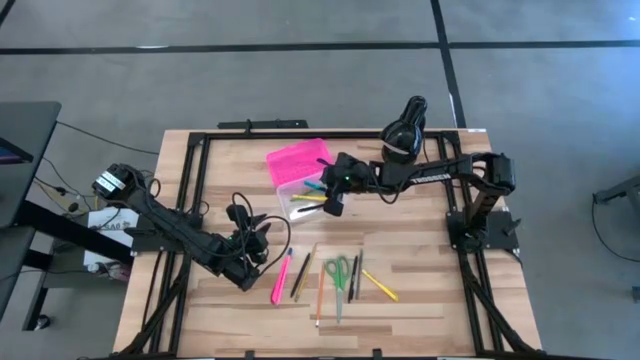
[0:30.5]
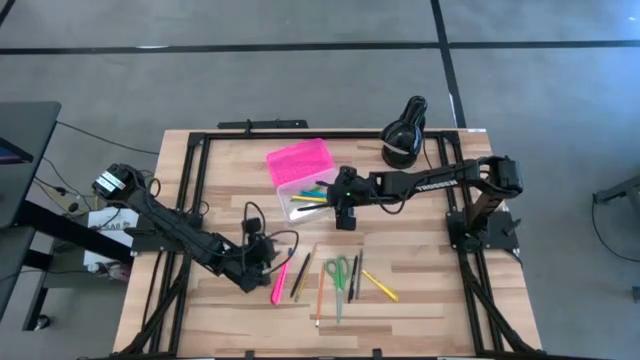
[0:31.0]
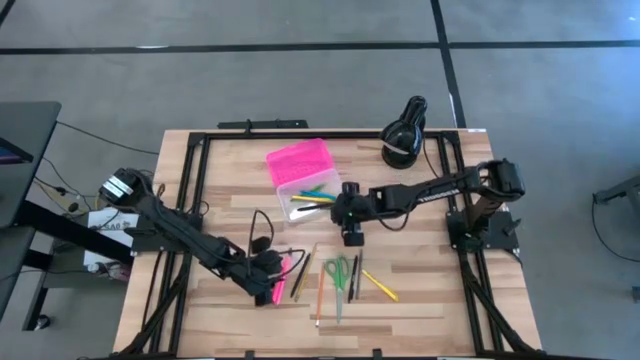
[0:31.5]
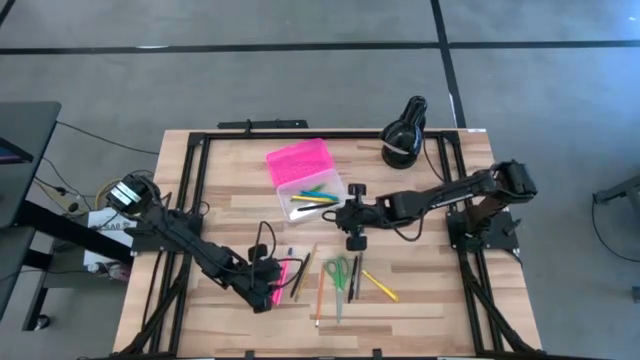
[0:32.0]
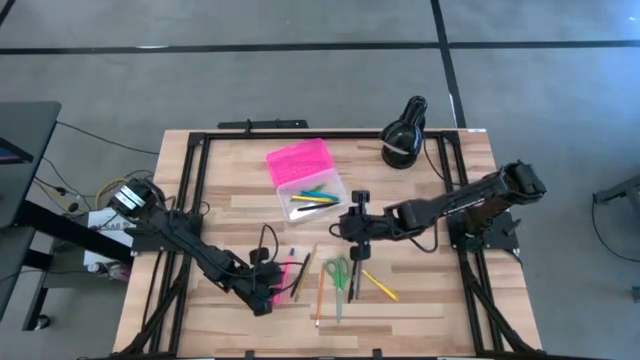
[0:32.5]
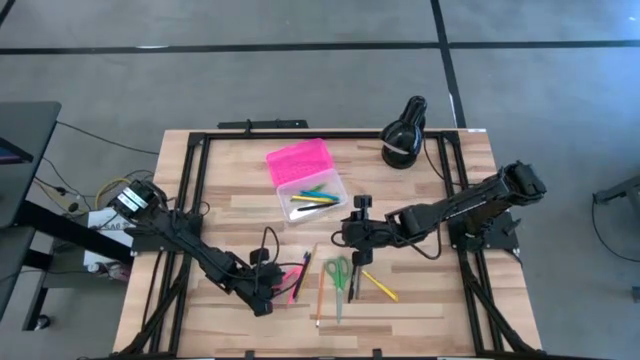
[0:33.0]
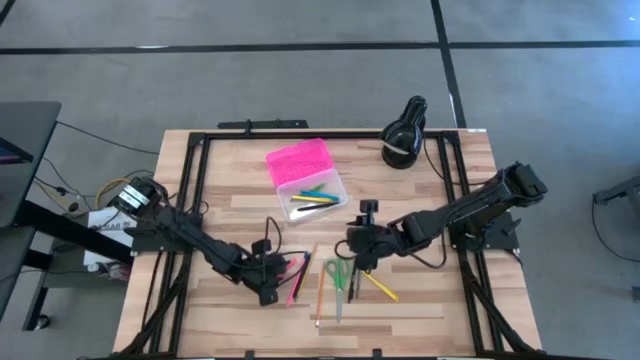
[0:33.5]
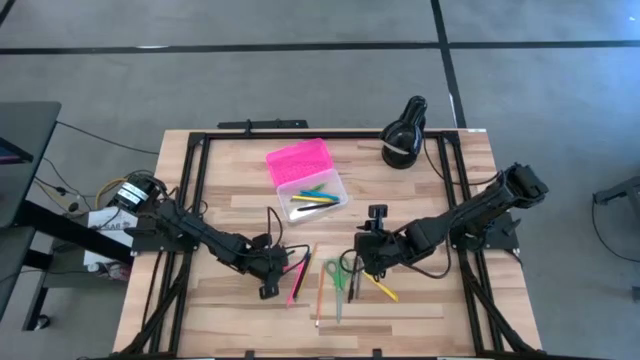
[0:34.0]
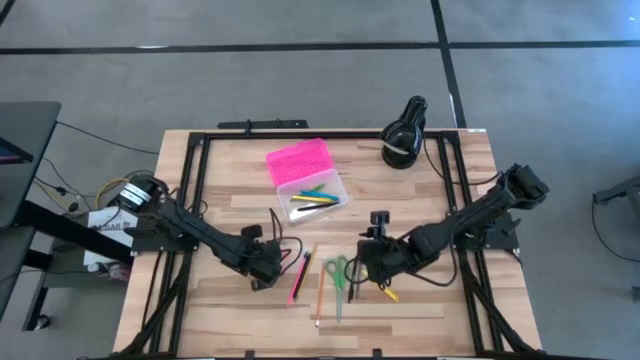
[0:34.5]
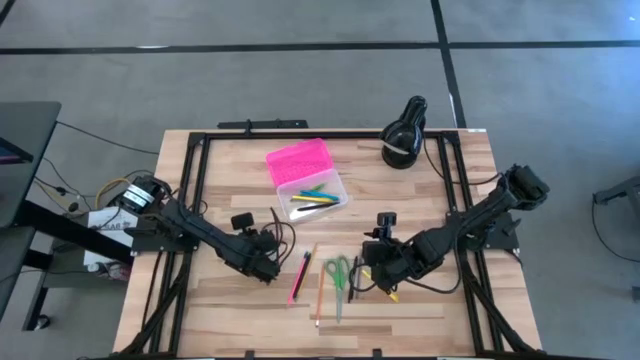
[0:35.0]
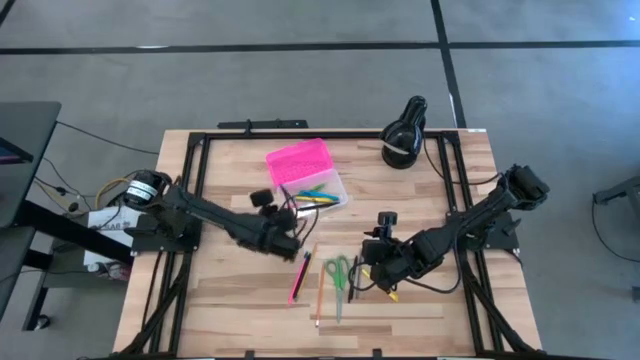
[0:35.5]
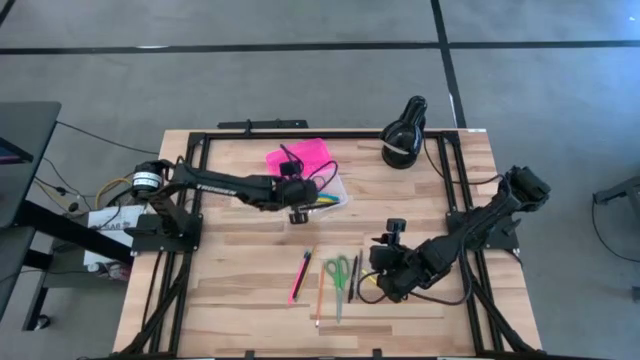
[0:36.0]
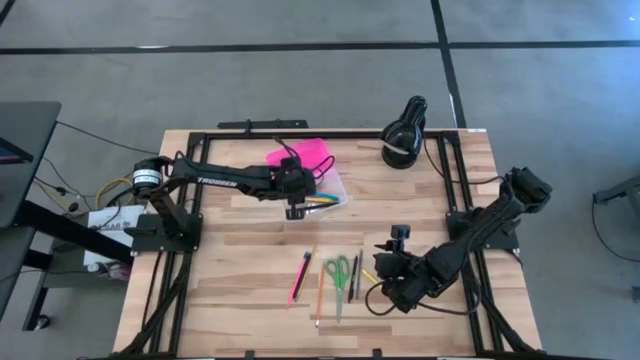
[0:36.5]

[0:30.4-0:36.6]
Task: Pick & place school supplies into a supply box
Put the pink pen into the pink supply box

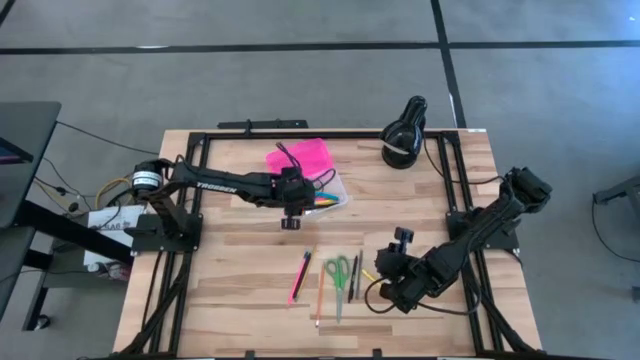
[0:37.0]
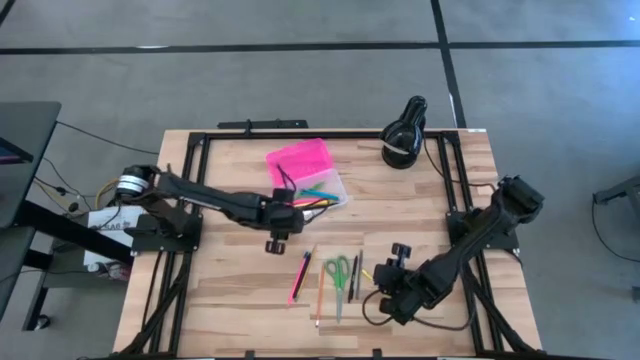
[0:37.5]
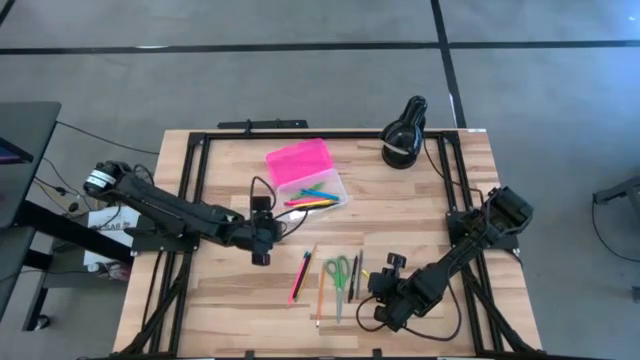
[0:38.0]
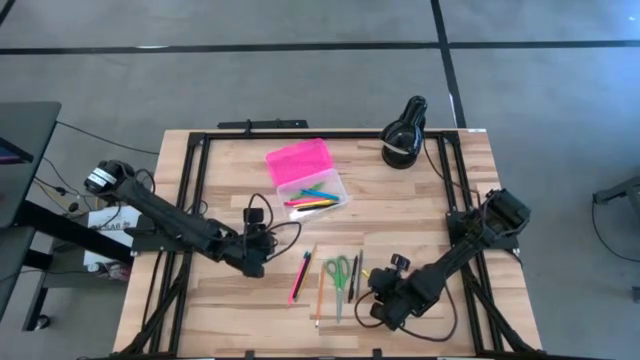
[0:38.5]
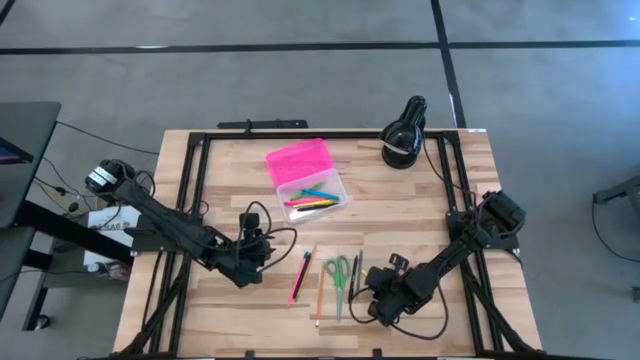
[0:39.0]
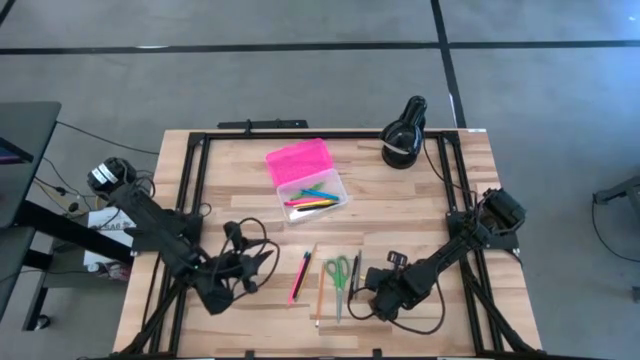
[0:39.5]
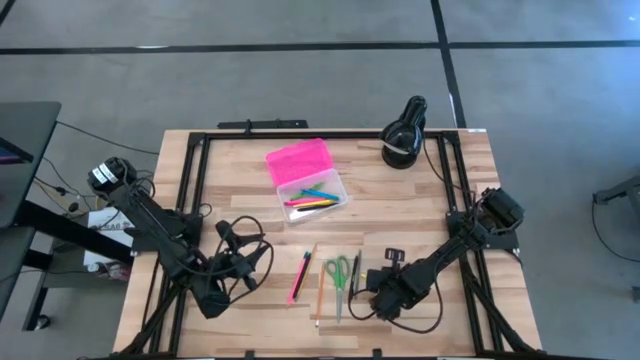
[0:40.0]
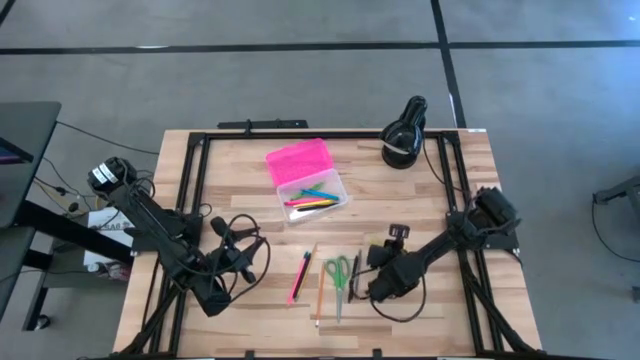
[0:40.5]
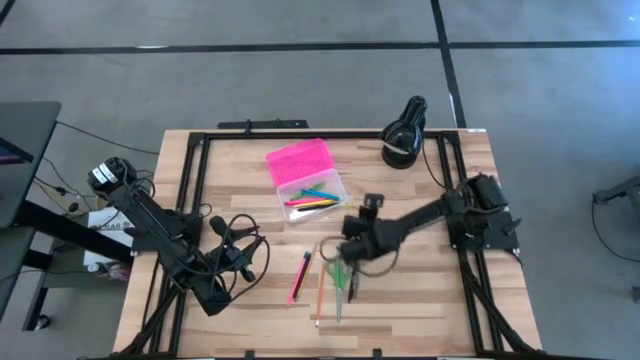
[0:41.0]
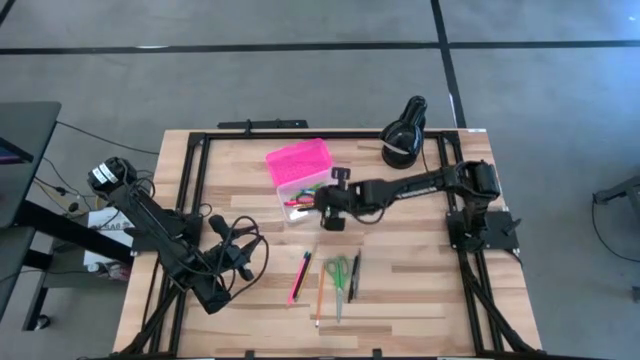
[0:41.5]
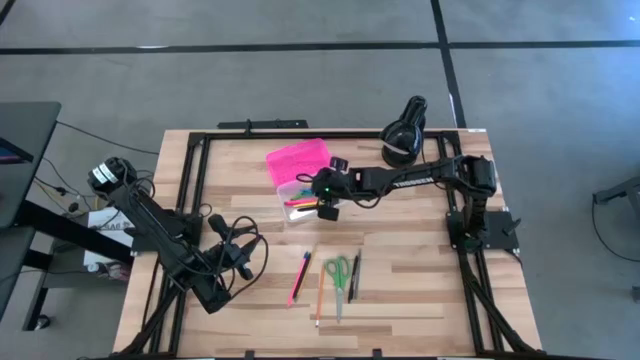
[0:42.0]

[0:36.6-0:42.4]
Put the yellow pen into the pink supply box

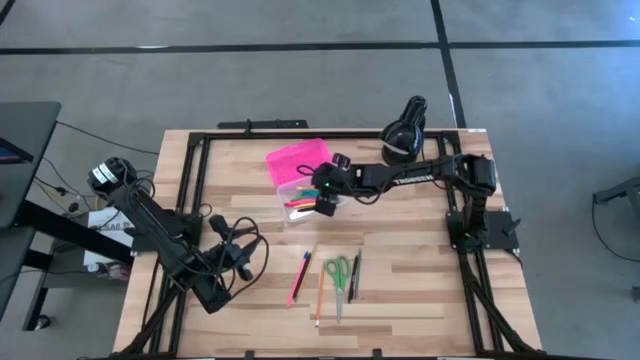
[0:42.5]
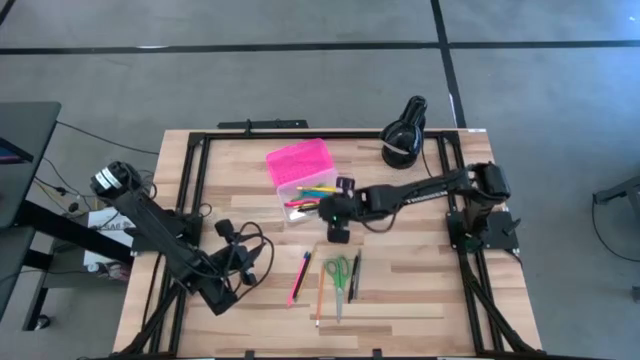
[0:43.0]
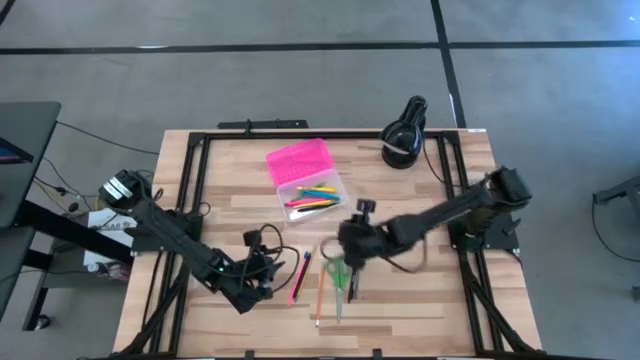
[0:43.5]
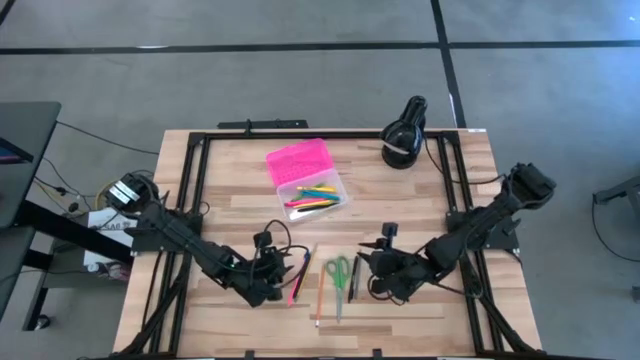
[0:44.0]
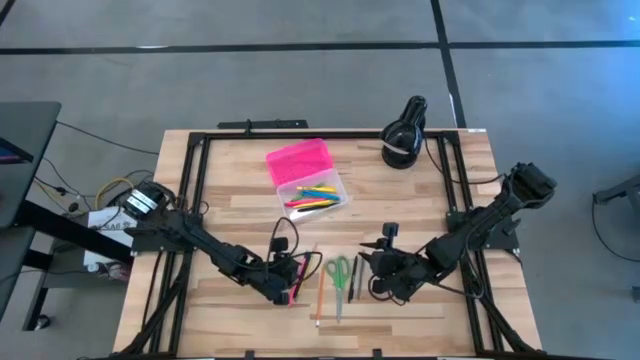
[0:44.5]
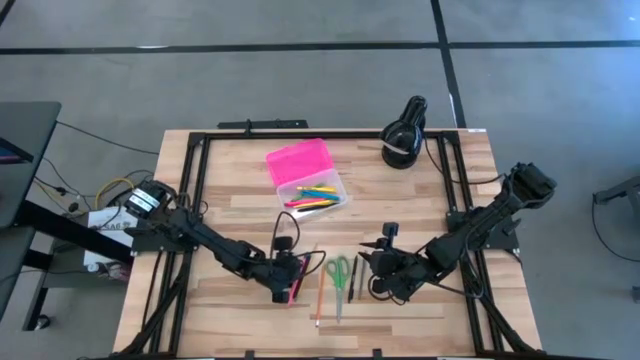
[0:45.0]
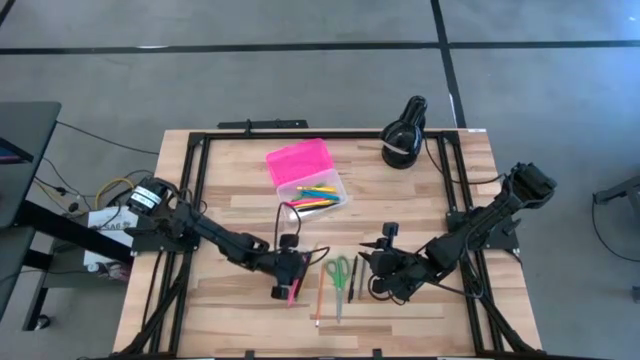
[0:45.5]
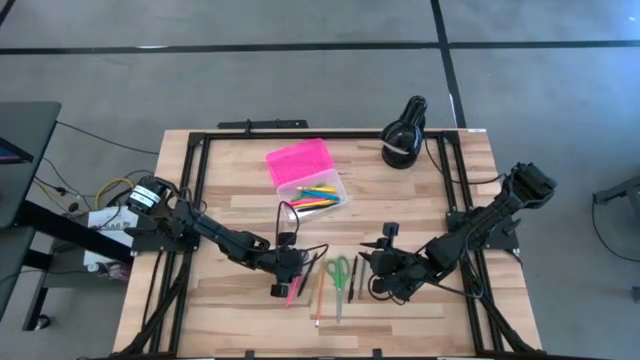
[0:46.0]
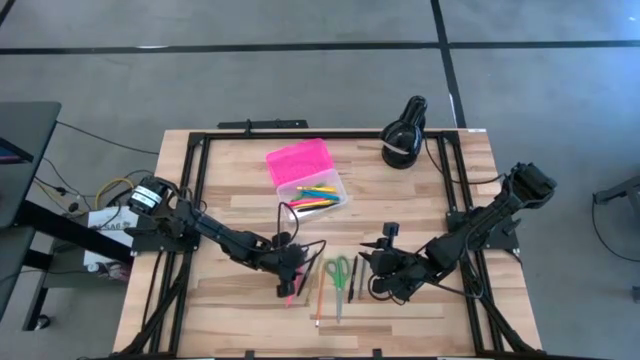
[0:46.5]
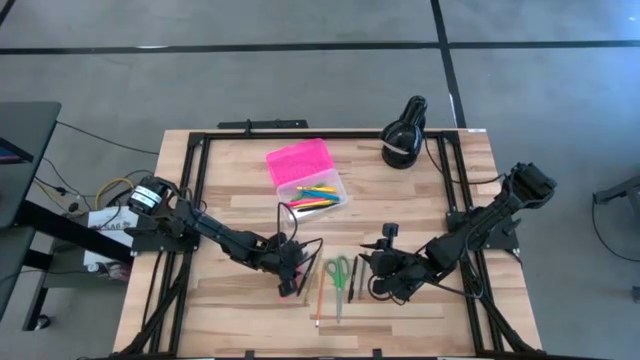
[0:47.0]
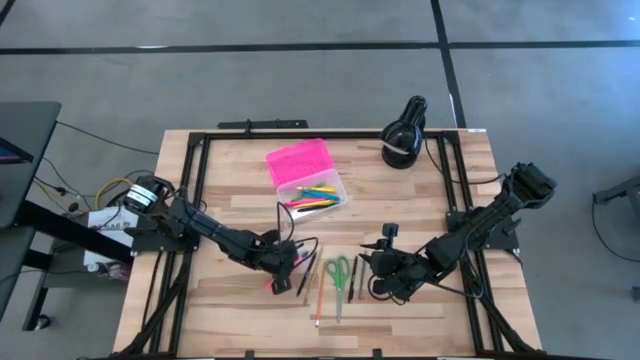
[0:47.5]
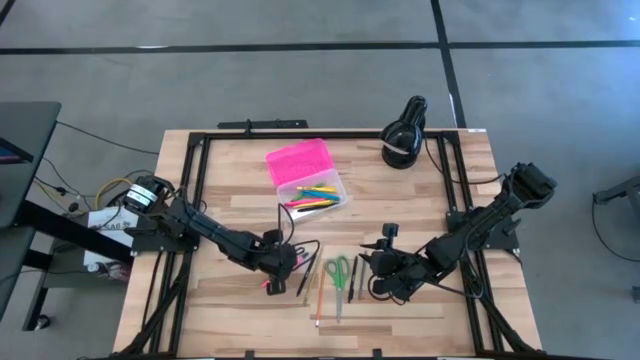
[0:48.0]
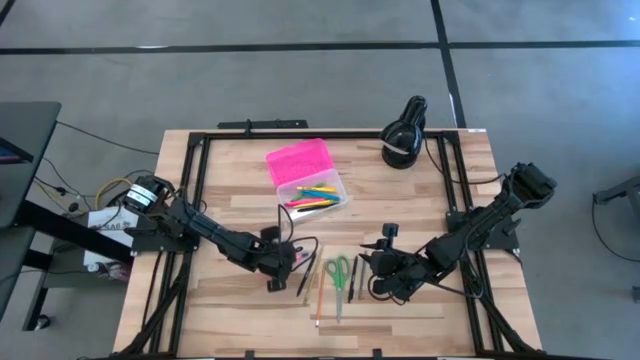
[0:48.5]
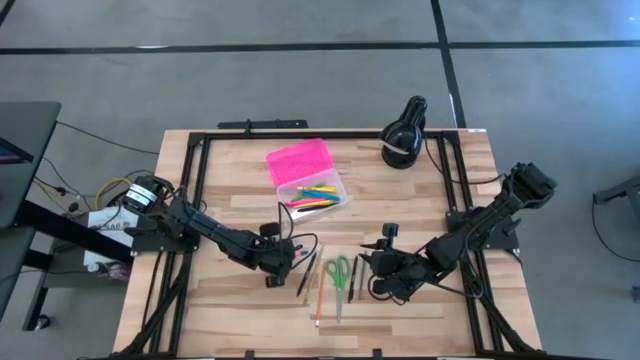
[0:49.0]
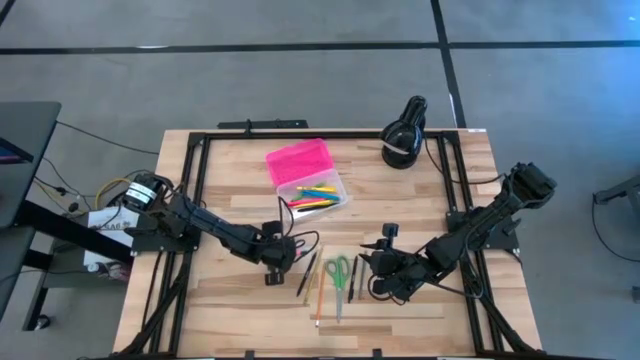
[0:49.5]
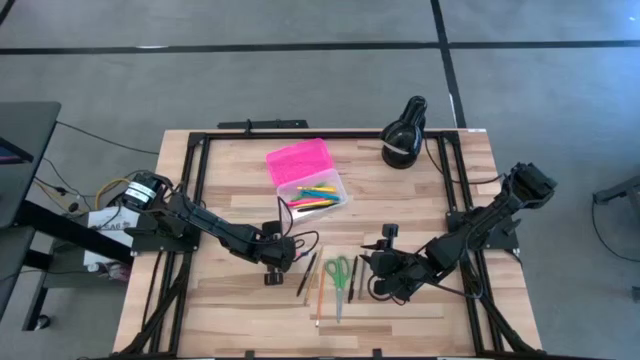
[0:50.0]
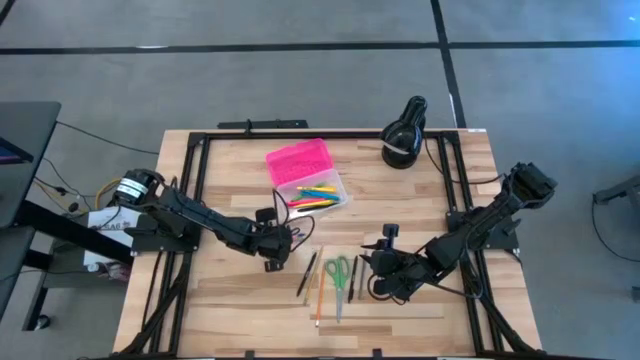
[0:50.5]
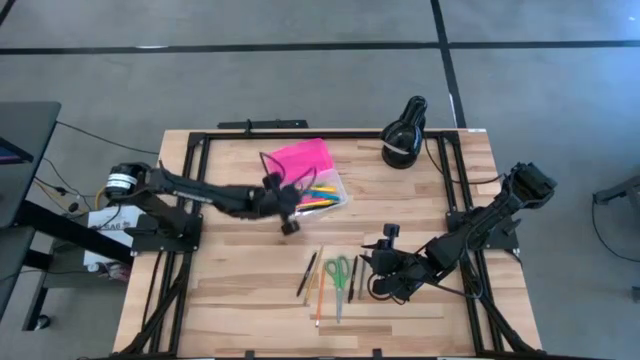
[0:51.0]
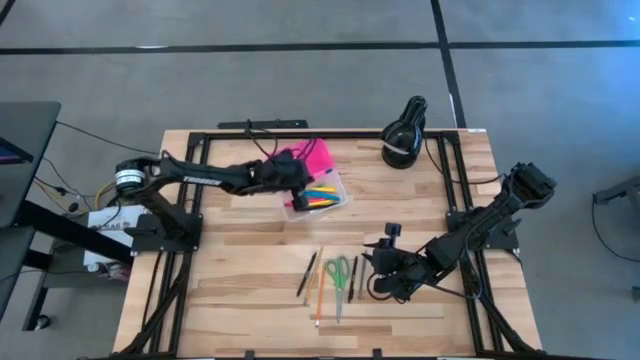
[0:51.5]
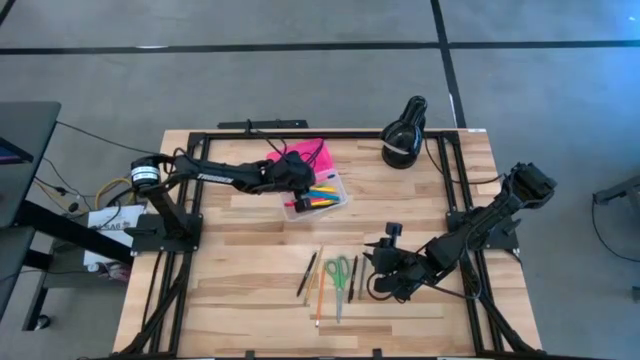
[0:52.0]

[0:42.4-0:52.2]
Put the pink pencil into the pink supply box
